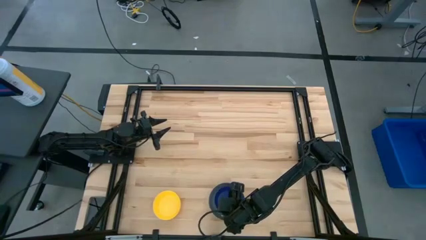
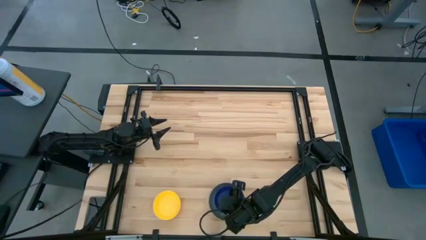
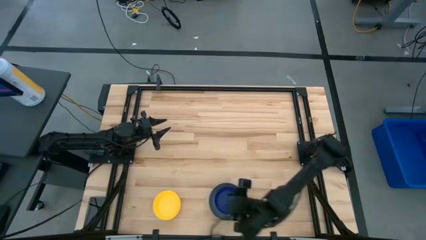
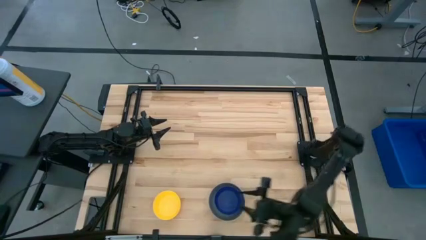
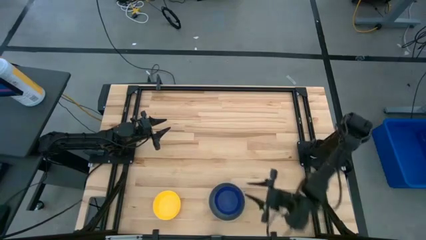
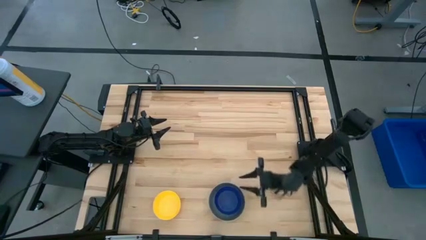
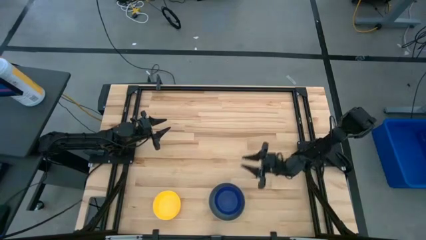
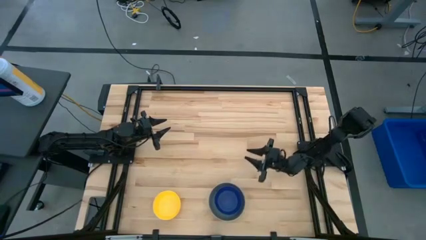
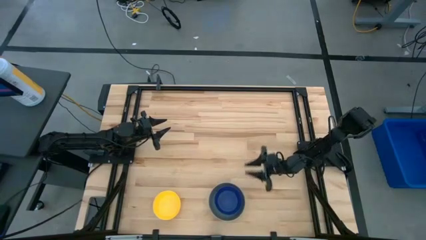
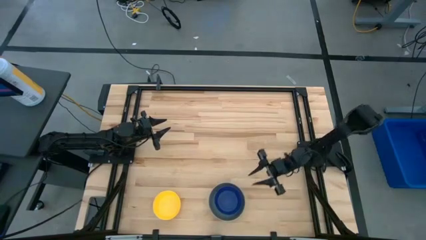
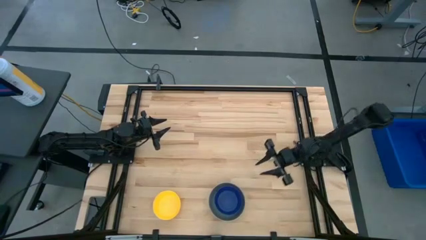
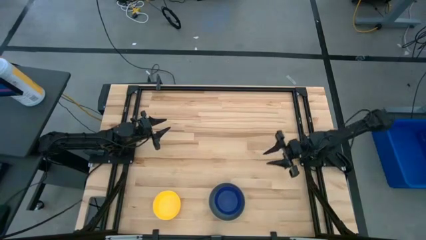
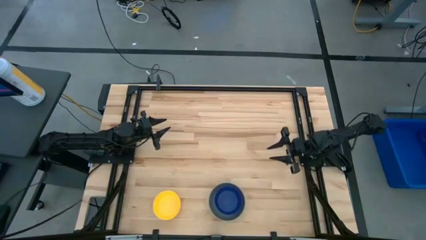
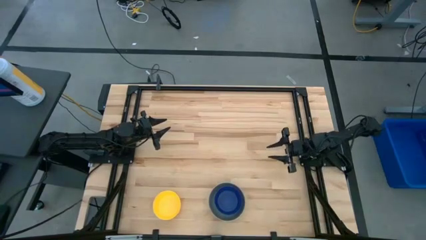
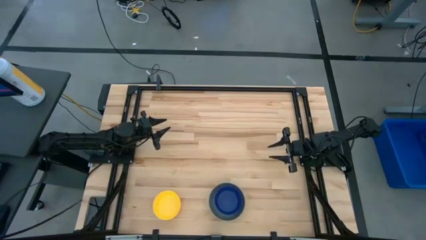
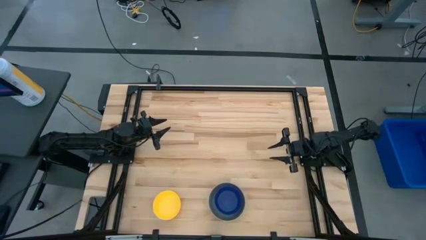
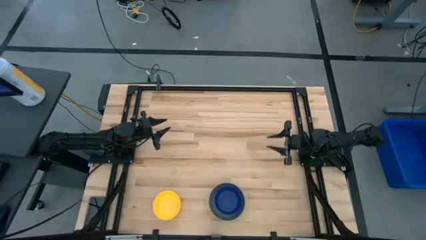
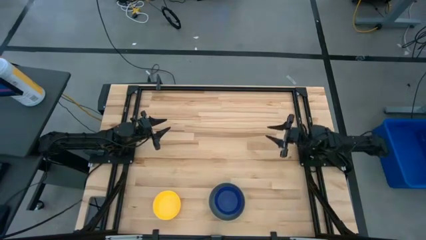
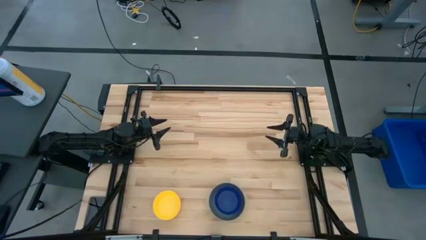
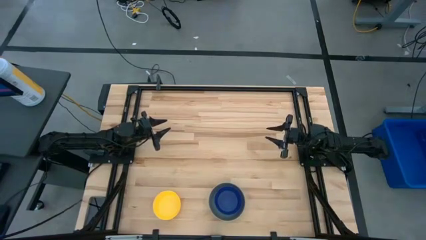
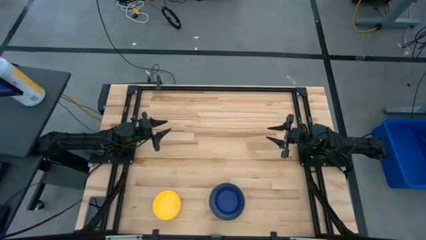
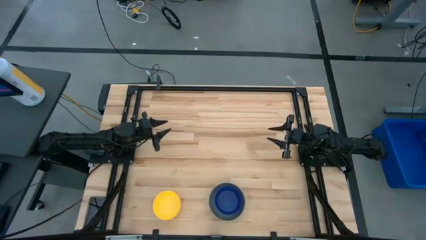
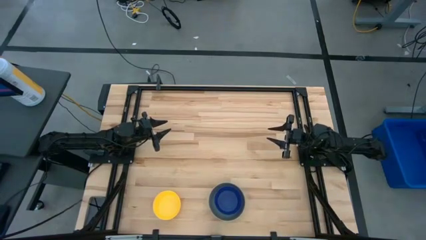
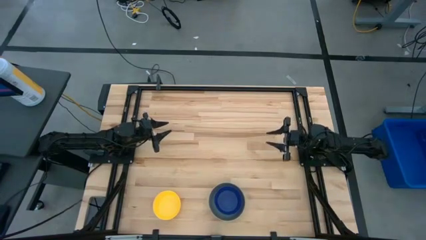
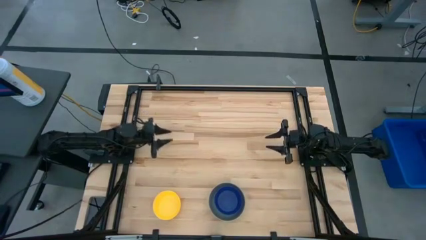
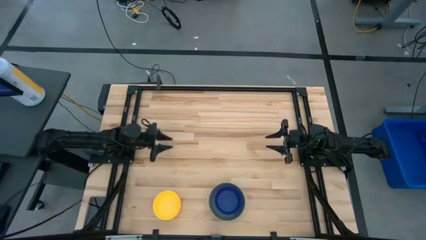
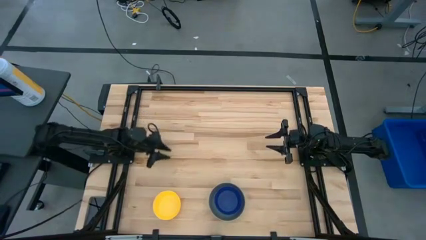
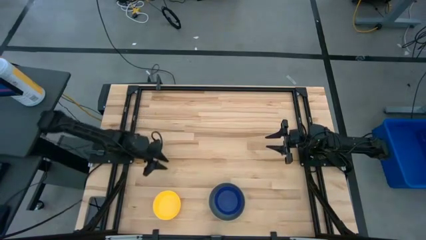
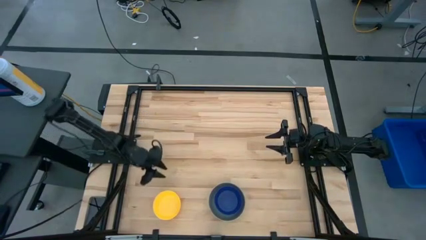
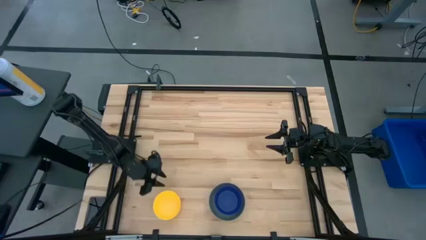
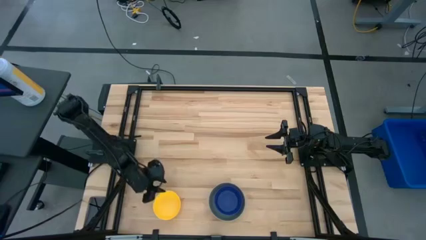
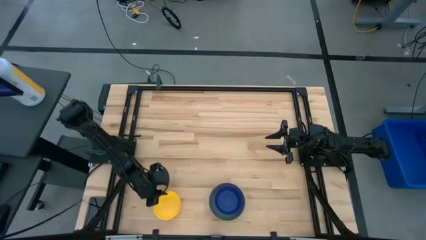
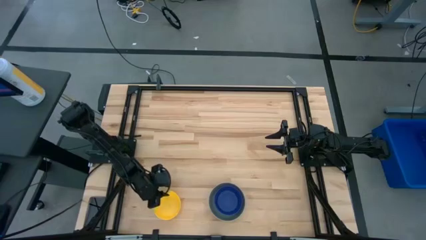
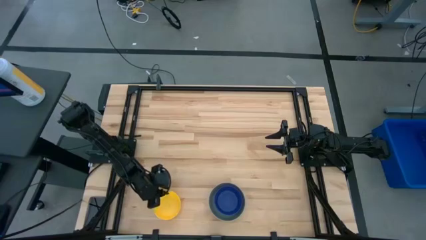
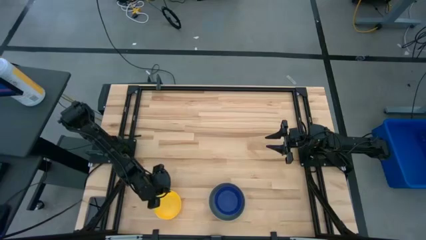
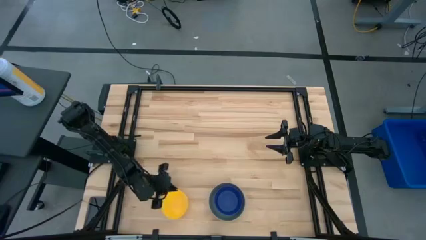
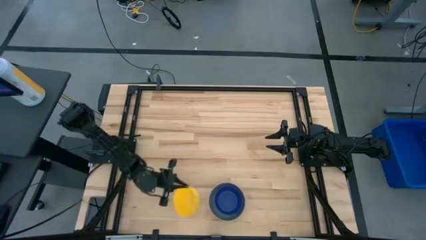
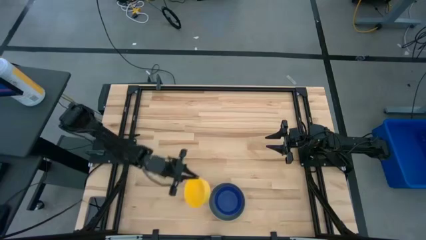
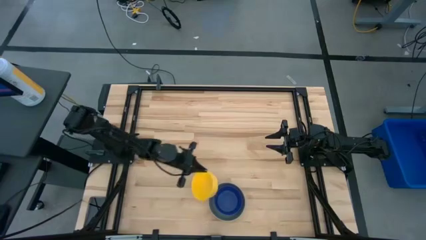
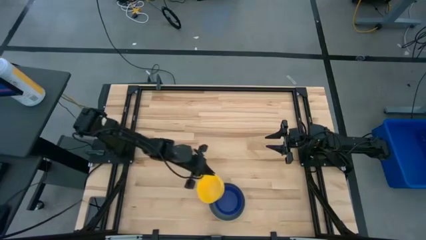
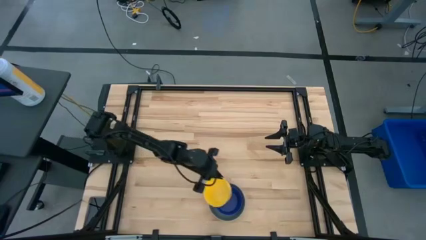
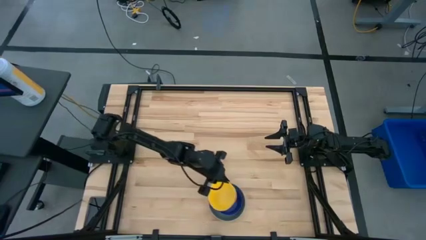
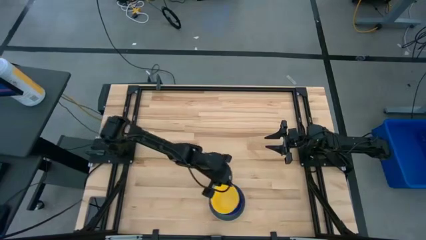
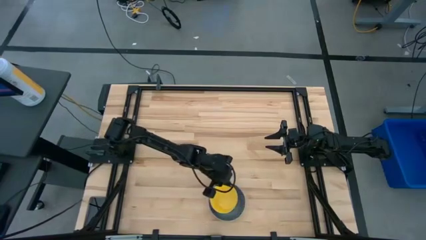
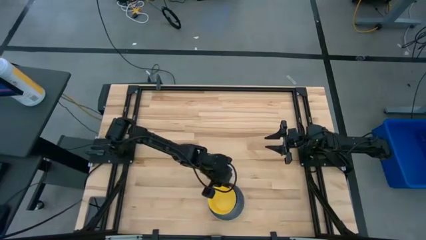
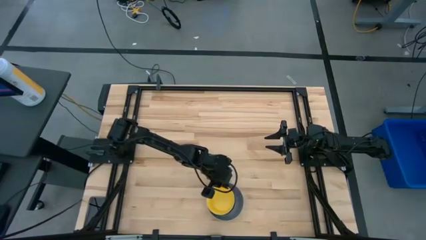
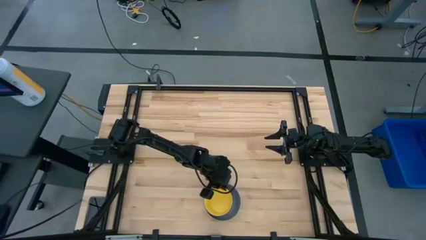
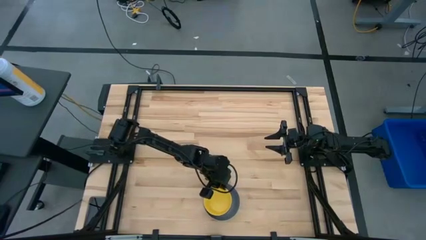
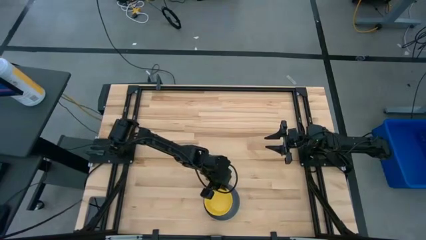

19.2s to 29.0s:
Stack the yellow bowl on top of the blue bowl

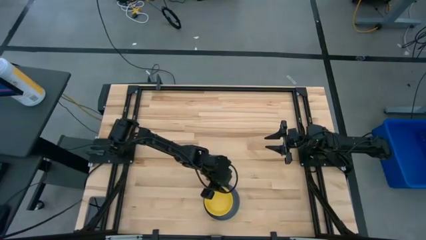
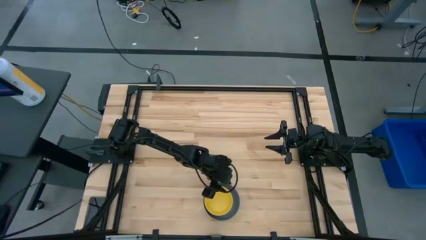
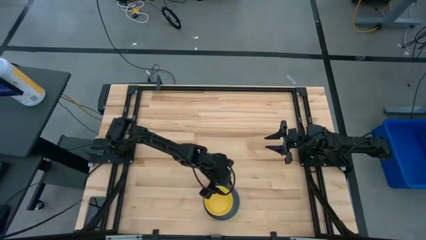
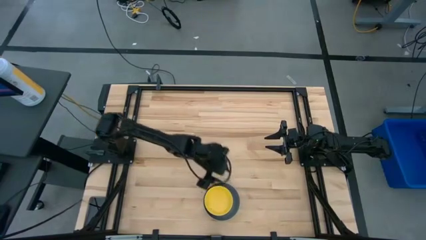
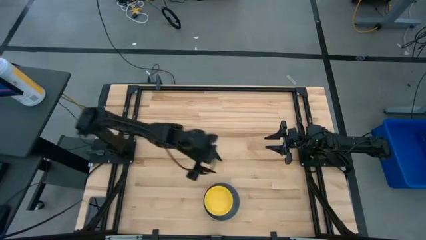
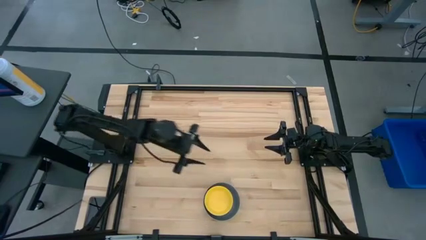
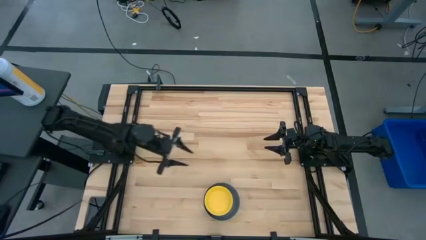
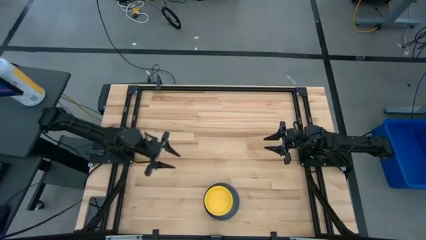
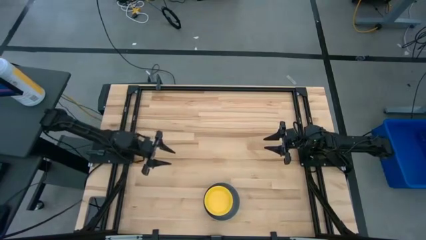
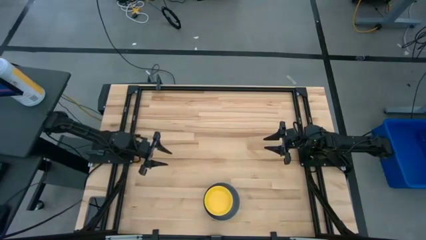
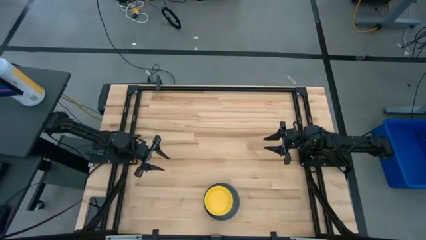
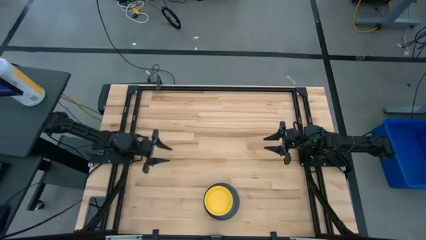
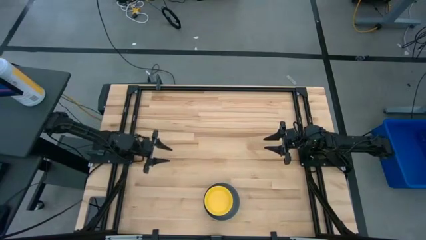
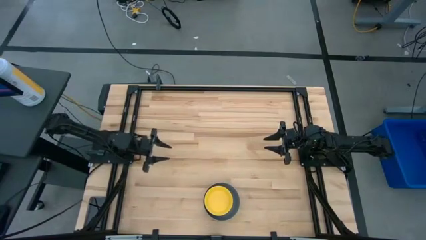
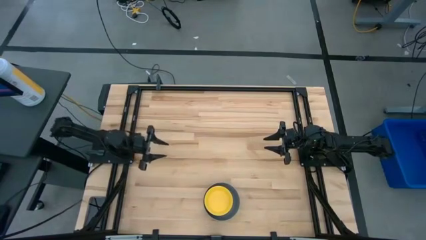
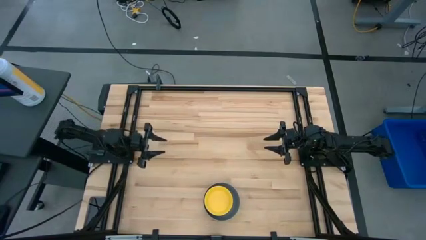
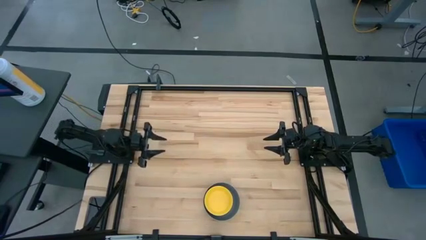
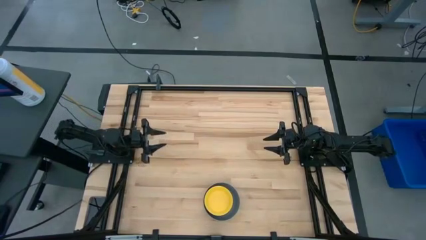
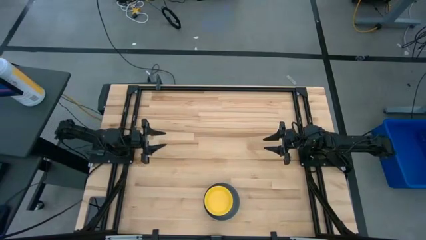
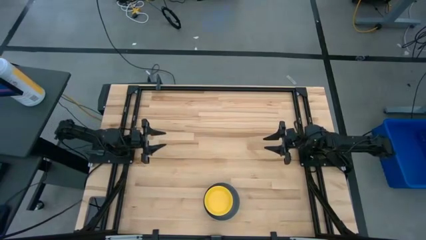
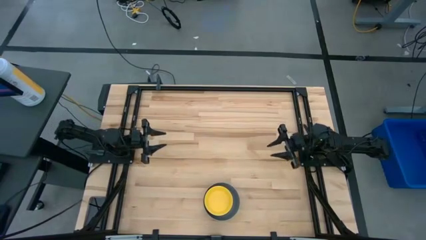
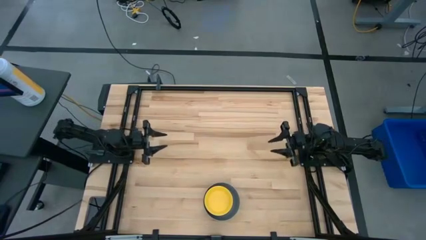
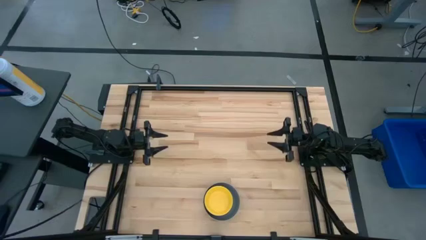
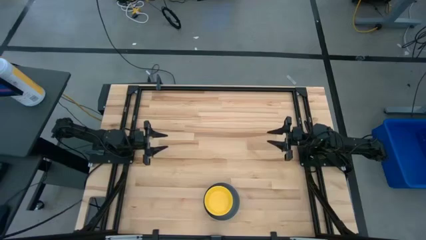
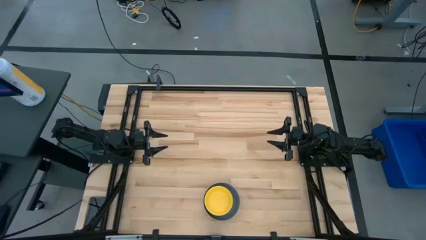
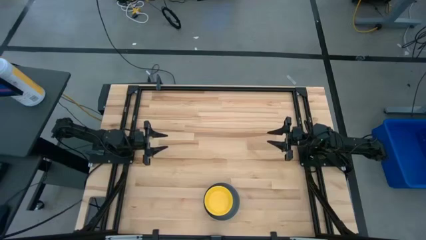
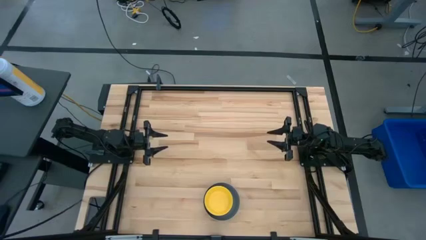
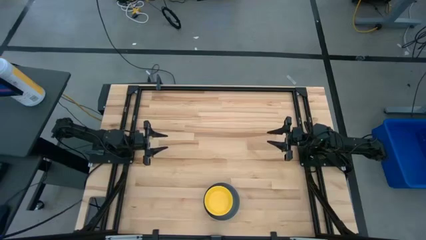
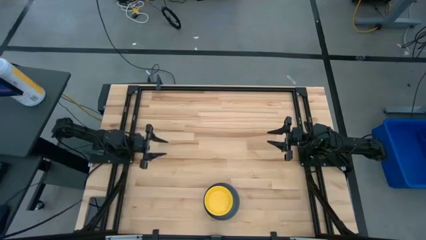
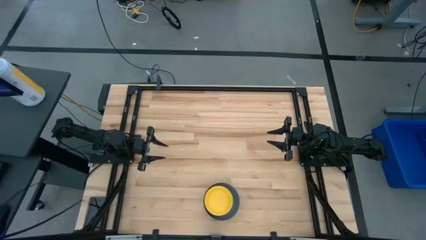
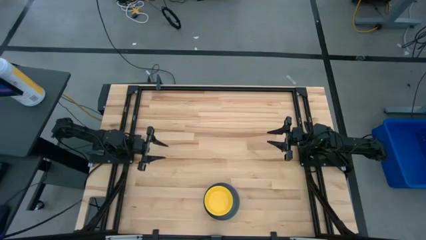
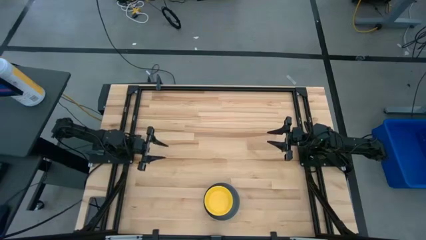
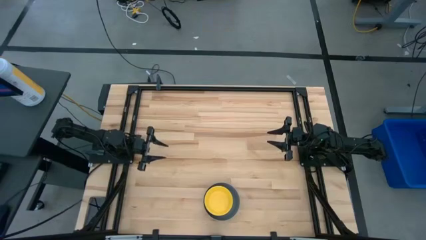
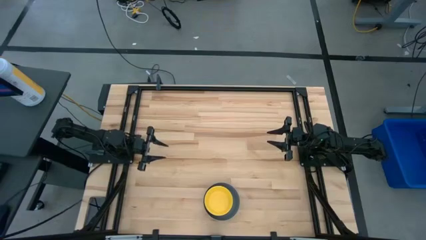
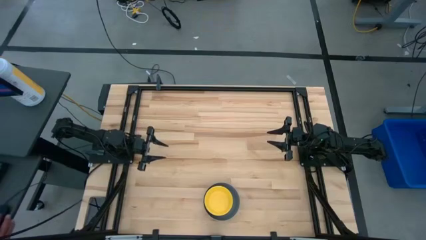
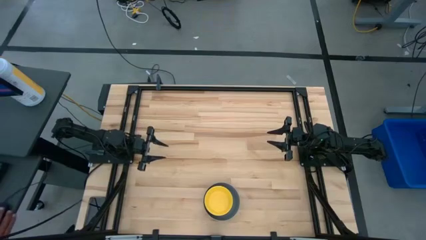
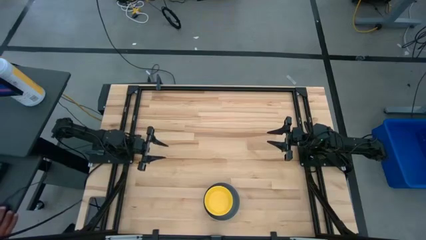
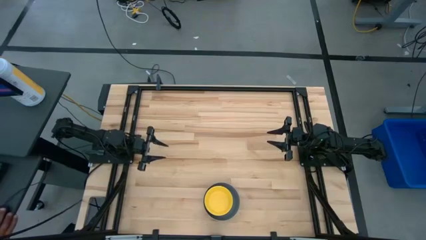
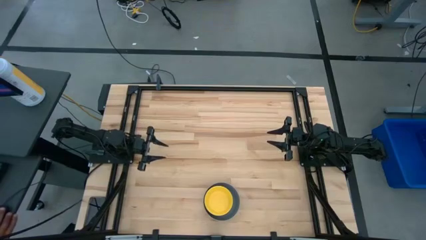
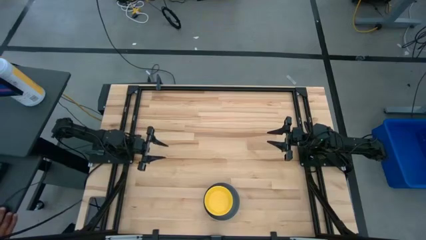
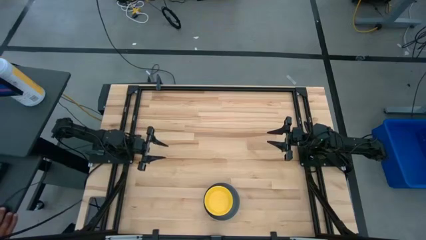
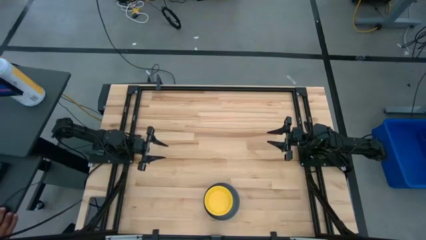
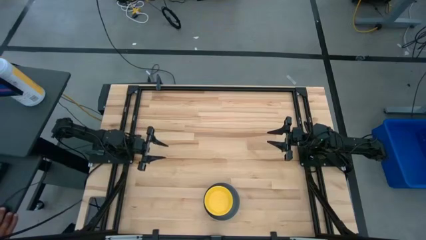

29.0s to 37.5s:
Return to Home Position
